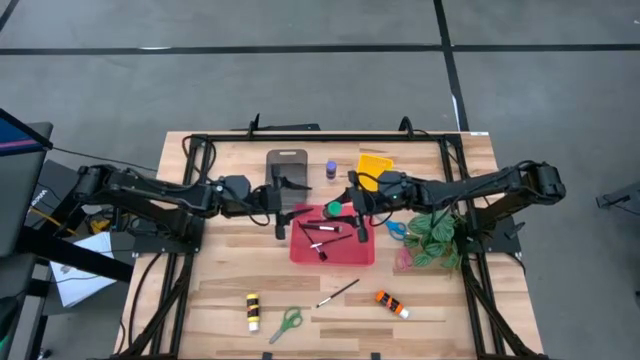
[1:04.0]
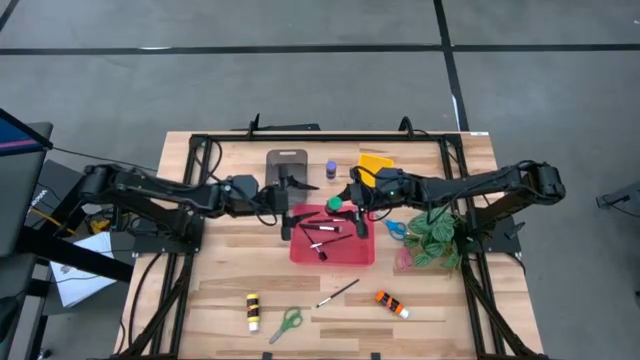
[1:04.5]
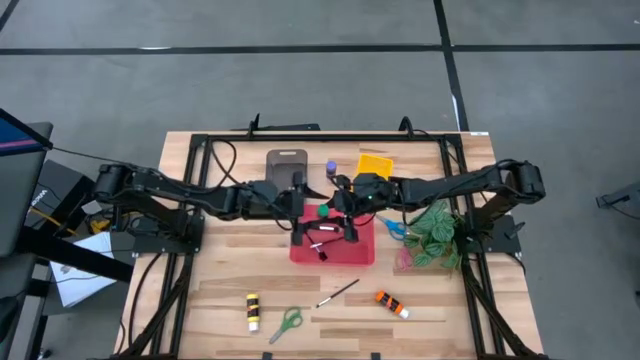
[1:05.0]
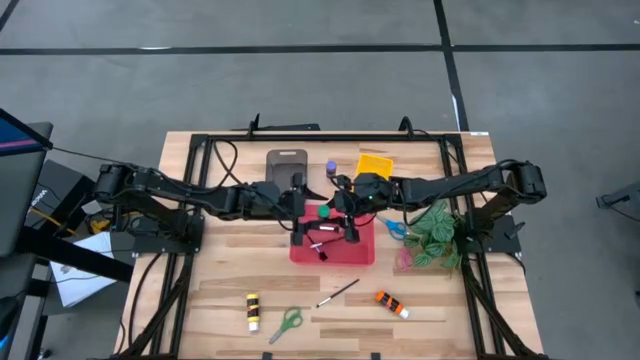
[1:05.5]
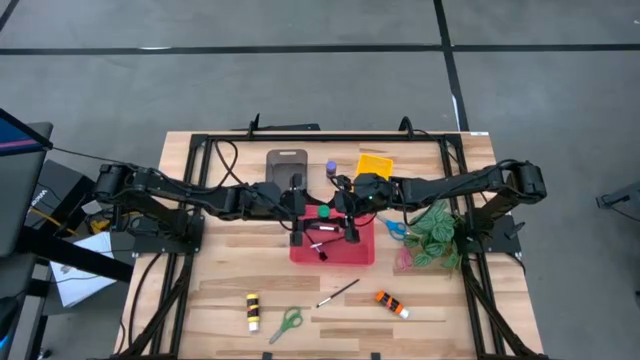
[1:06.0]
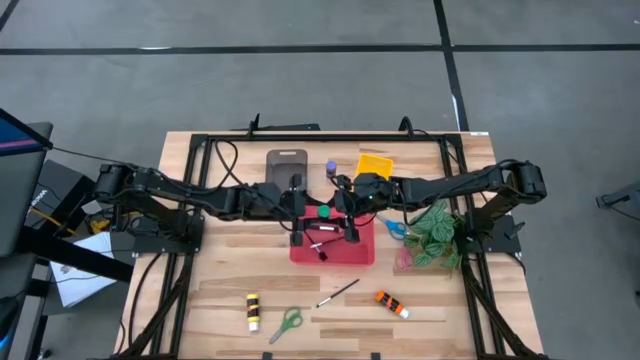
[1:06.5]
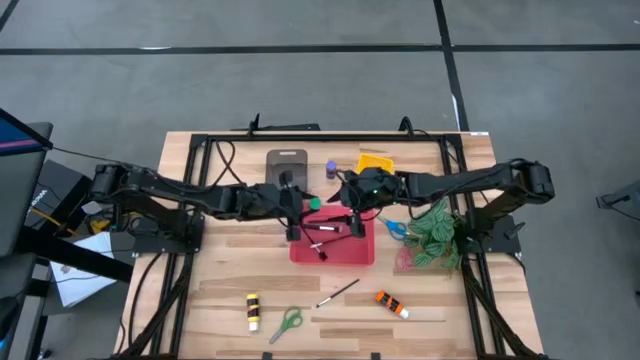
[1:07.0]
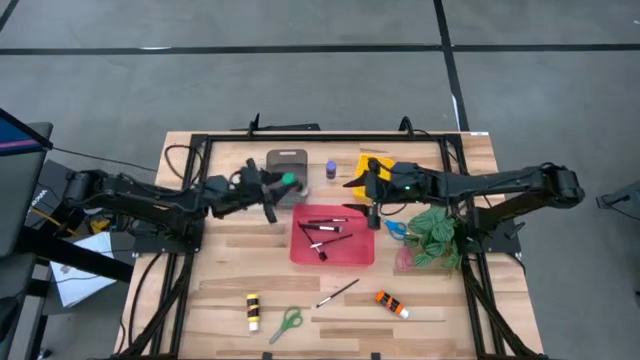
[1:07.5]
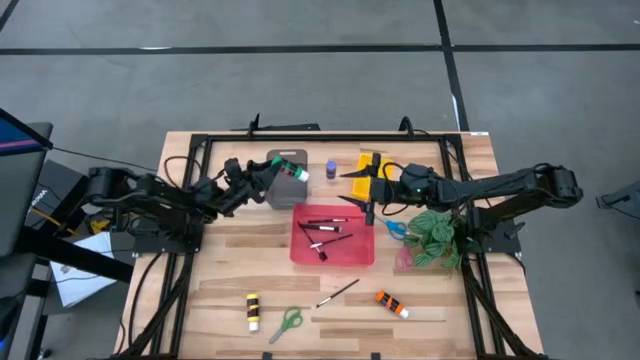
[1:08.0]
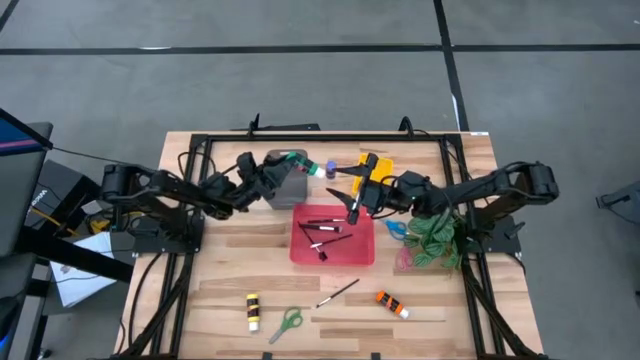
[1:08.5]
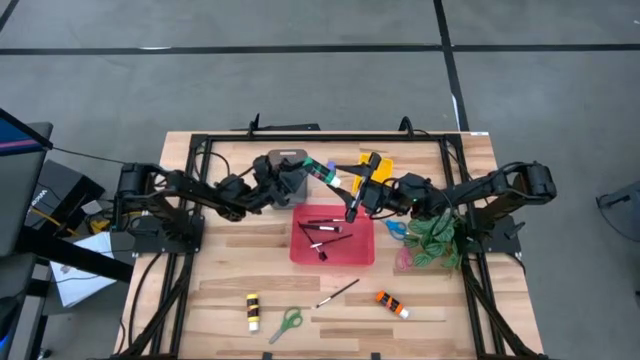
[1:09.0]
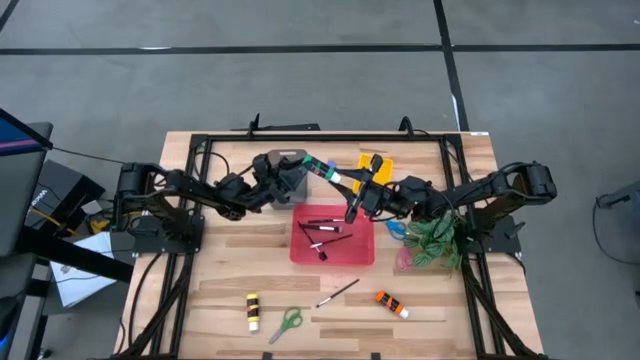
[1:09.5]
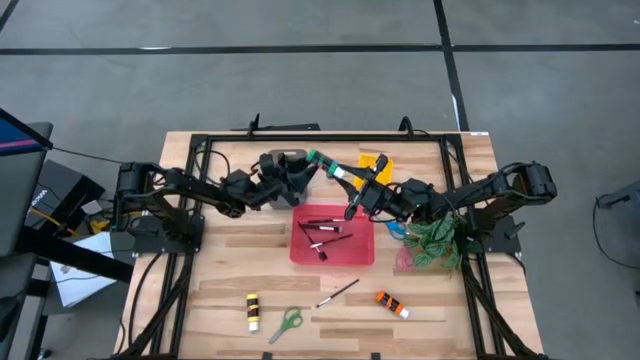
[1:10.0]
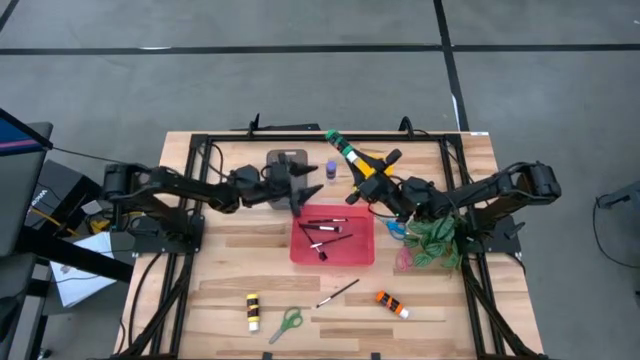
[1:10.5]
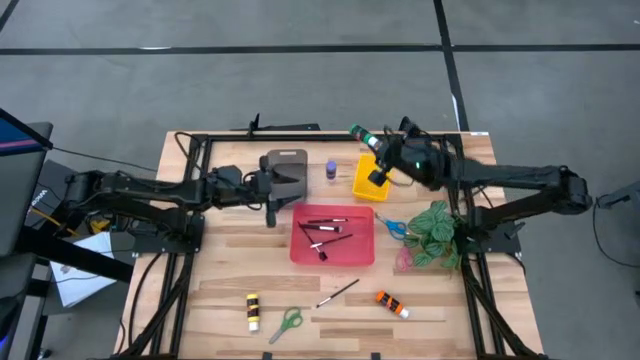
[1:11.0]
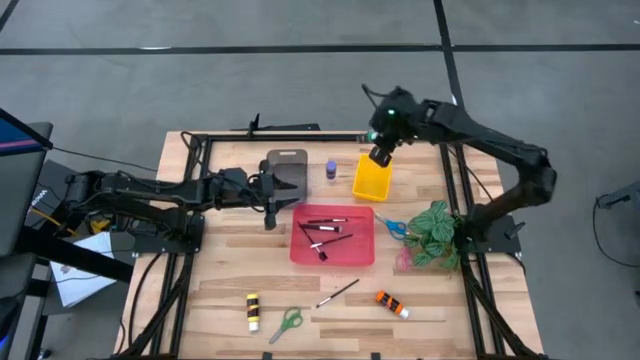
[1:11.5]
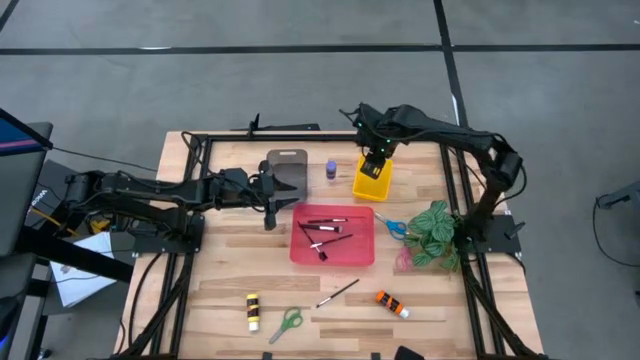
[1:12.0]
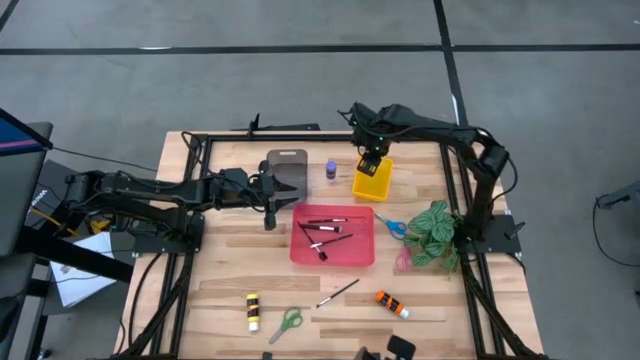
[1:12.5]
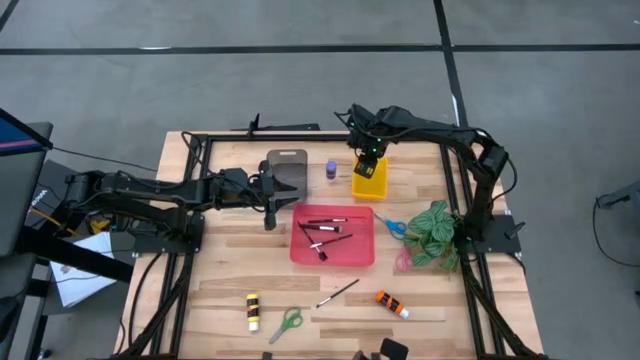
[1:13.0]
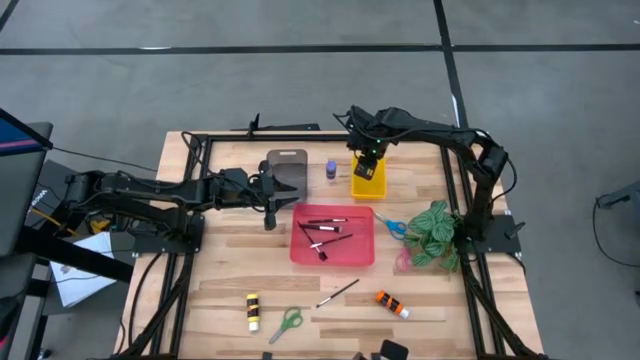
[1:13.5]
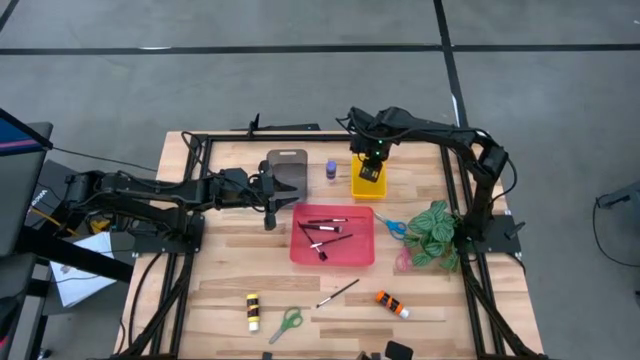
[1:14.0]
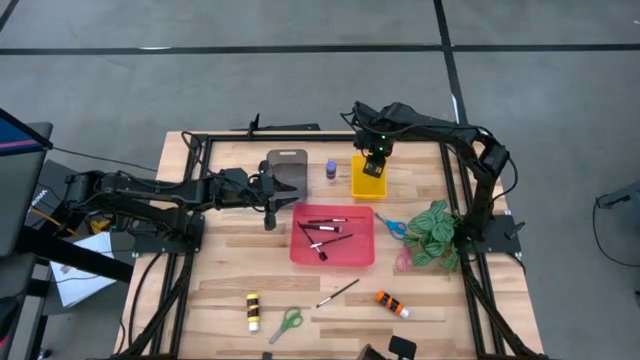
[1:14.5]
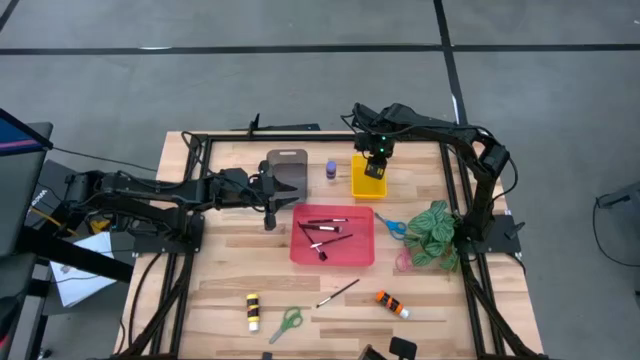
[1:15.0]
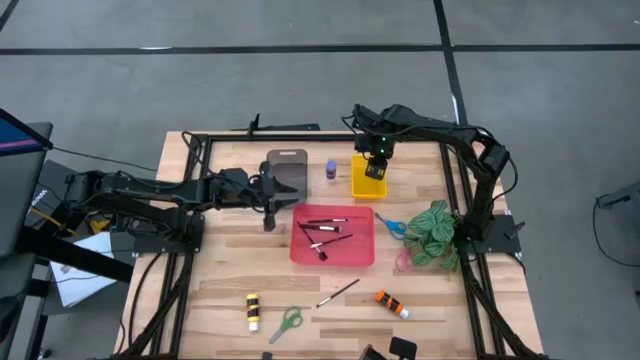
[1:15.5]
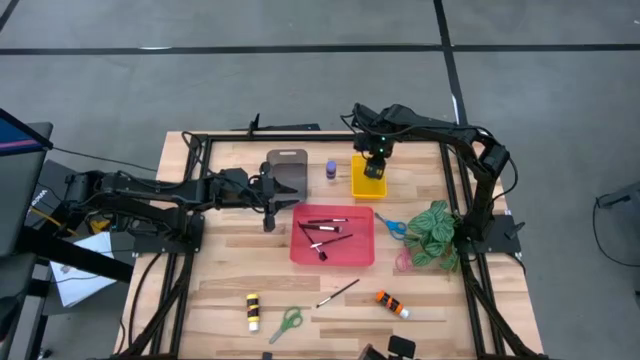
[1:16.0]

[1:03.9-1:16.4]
Task: Pick & Place Paint Supplies
Put the green paint bottle into the yellow bin

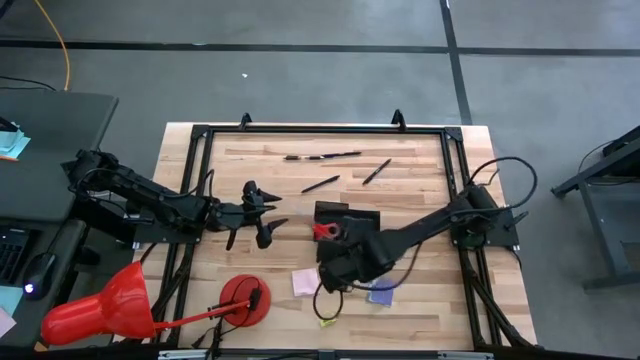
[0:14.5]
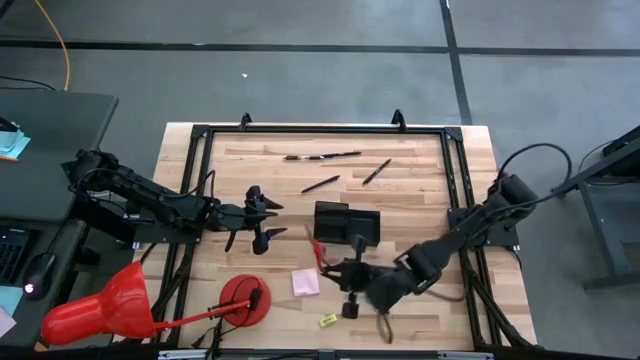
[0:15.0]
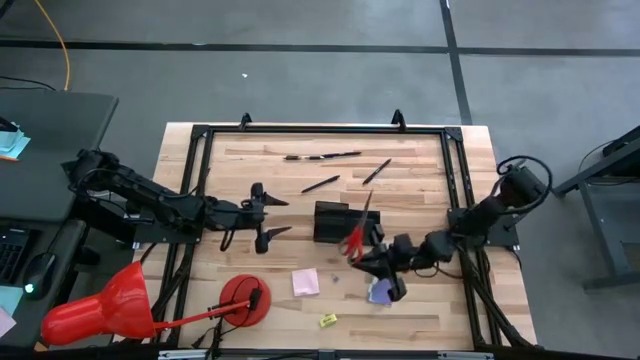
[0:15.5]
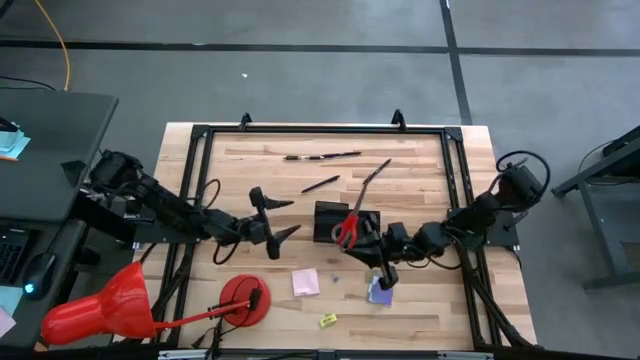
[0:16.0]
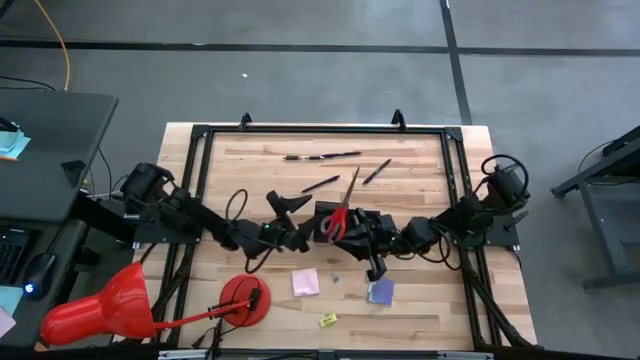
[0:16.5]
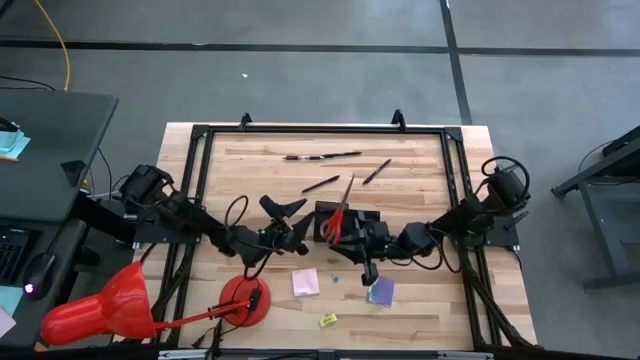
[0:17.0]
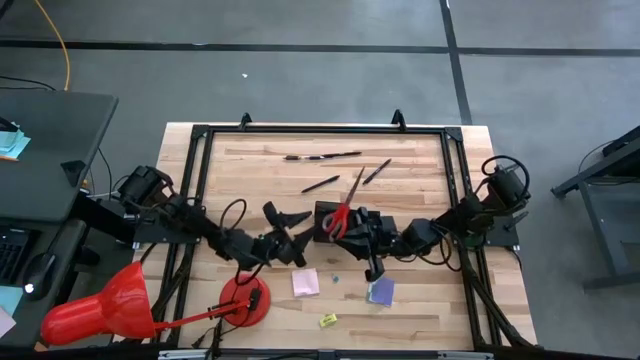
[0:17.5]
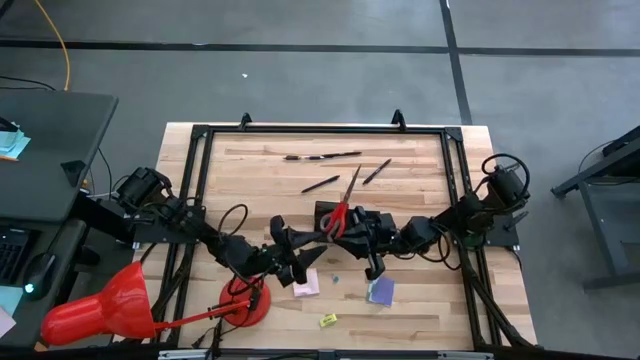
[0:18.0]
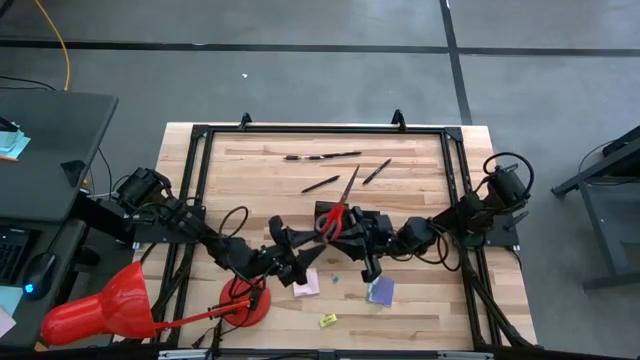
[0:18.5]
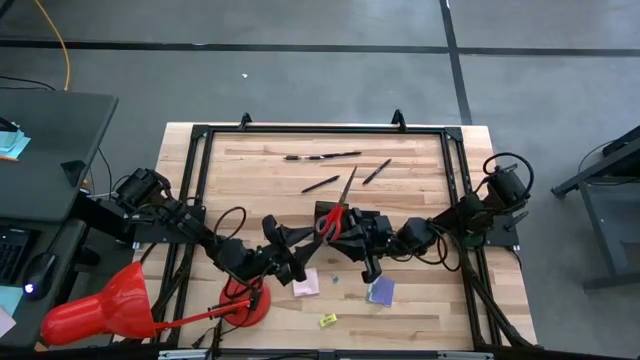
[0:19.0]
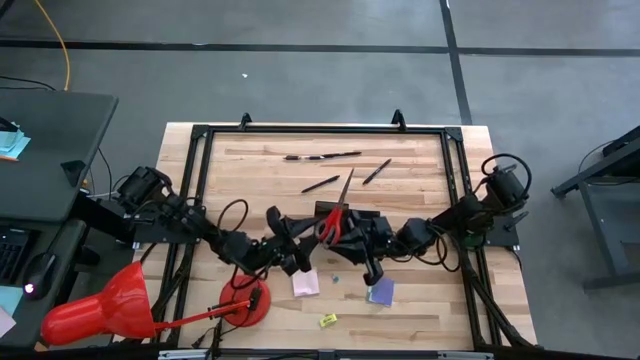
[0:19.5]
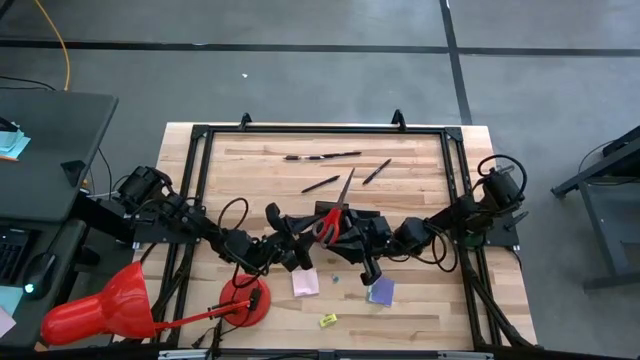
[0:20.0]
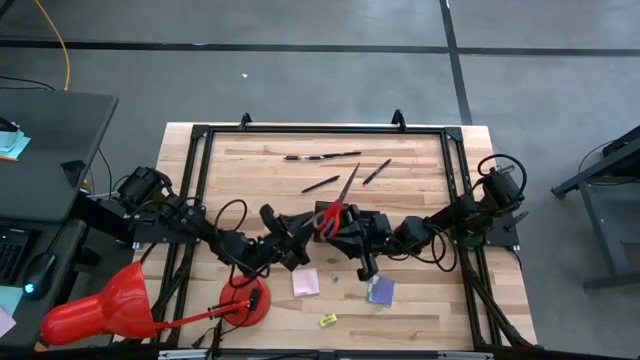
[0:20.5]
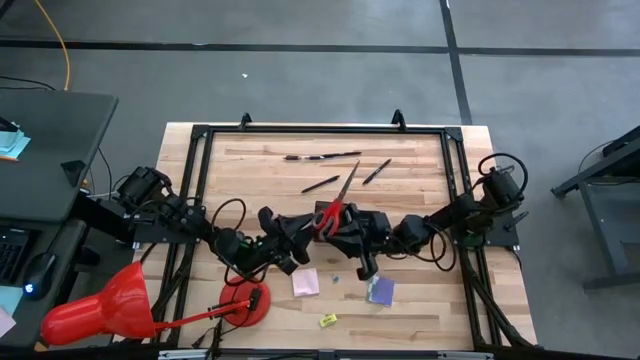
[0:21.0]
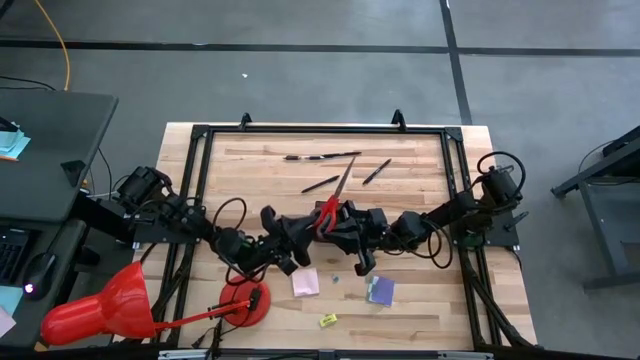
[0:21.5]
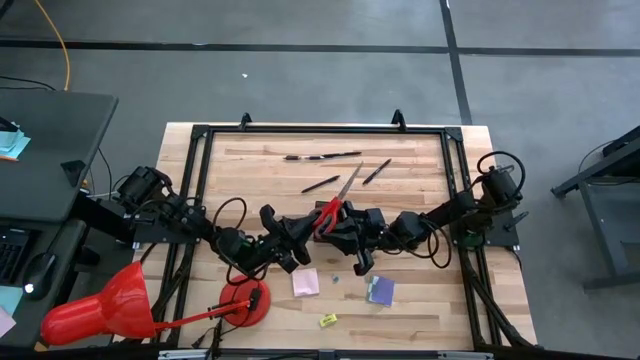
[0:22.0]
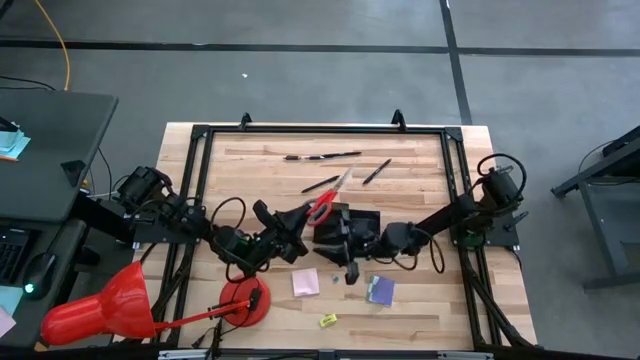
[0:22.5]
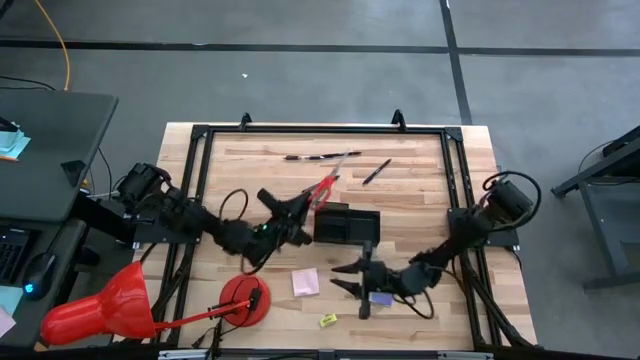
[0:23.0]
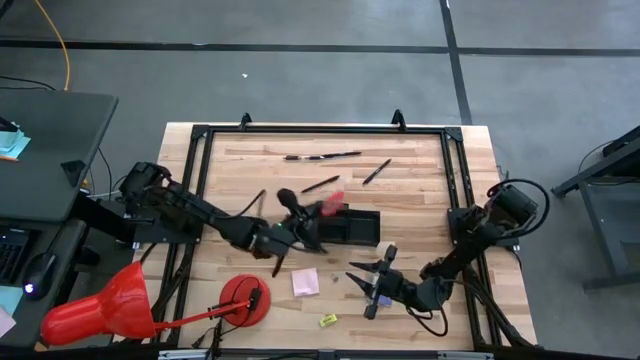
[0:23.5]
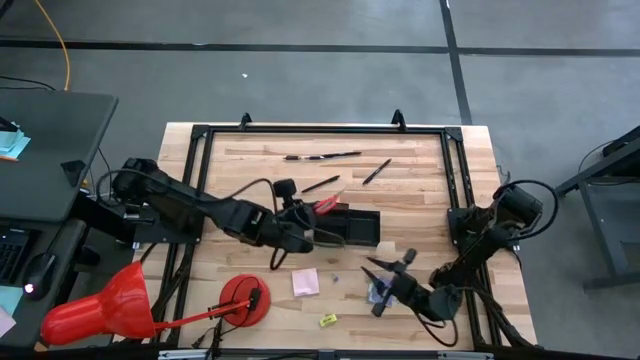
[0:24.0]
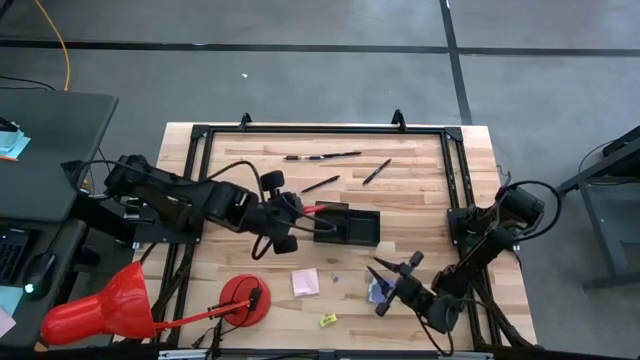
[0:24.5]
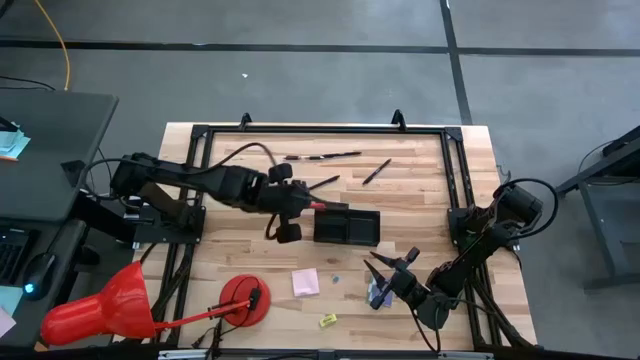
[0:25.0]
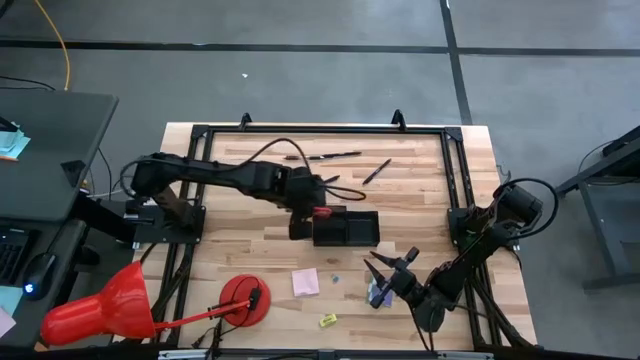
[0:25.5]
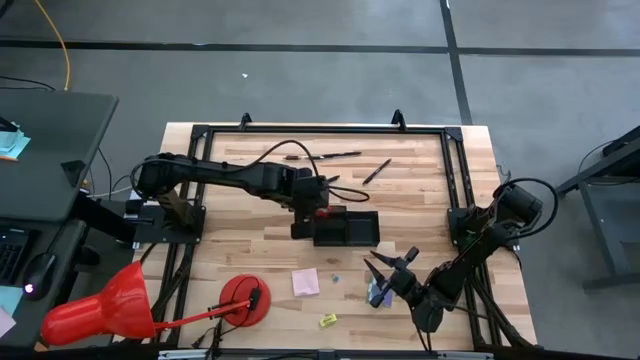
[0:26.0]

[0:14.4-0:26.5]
Task: Pick and place office supplies into organizer
Put the red scissor into the black desk organizer
